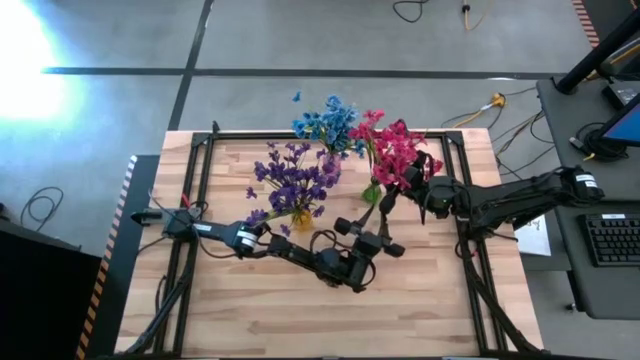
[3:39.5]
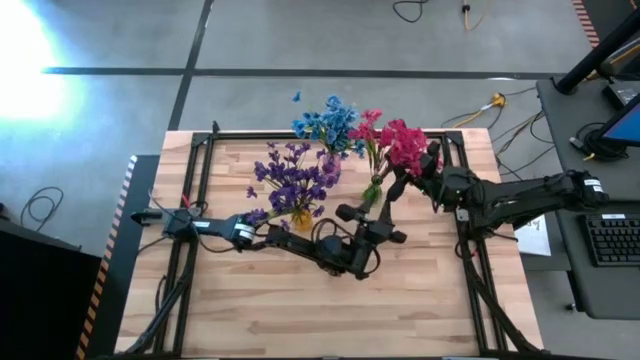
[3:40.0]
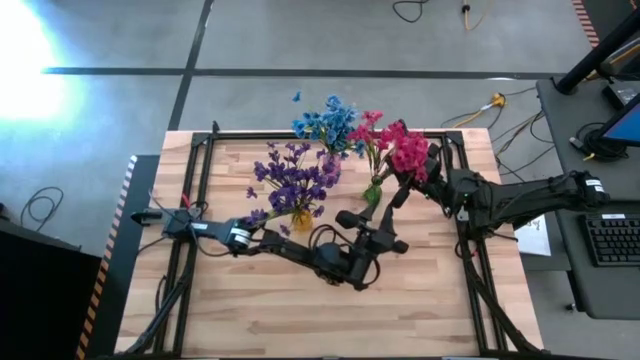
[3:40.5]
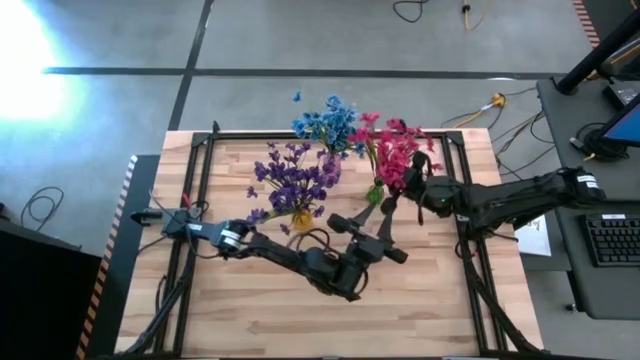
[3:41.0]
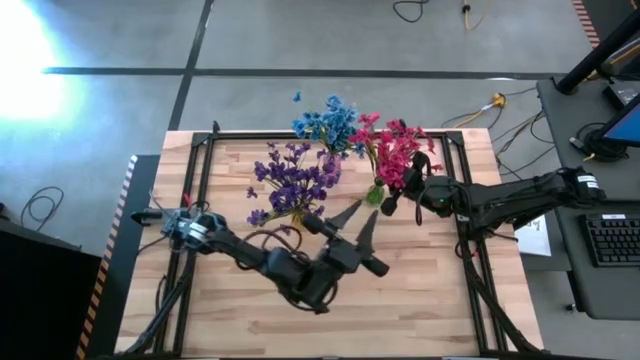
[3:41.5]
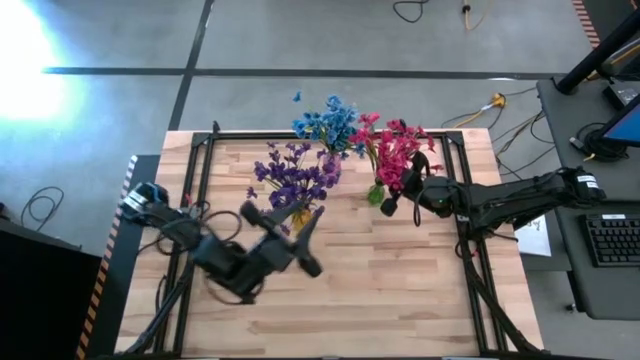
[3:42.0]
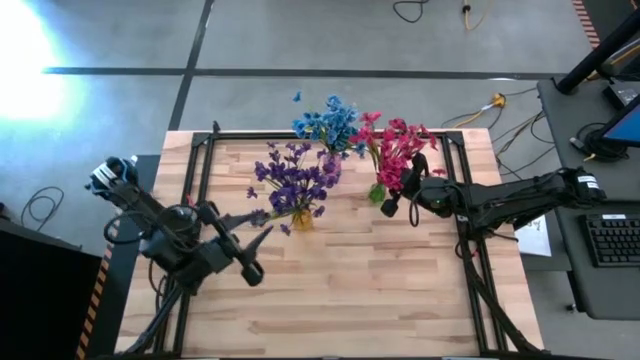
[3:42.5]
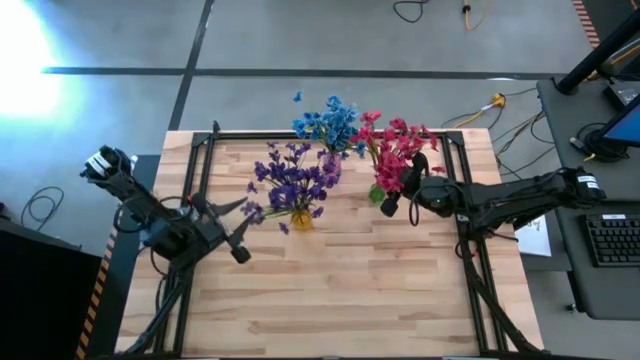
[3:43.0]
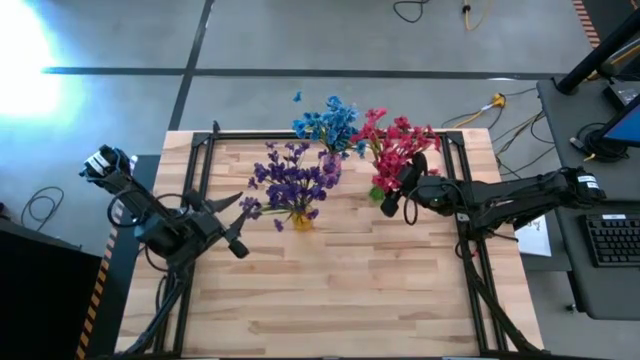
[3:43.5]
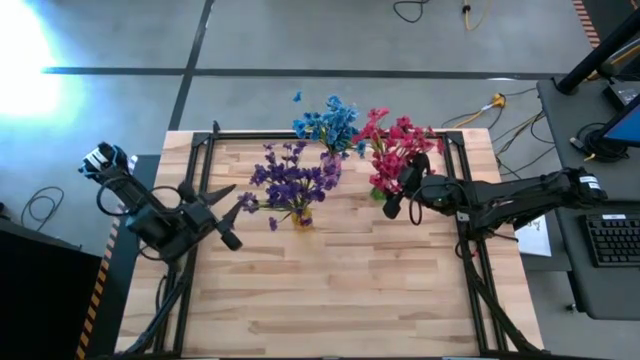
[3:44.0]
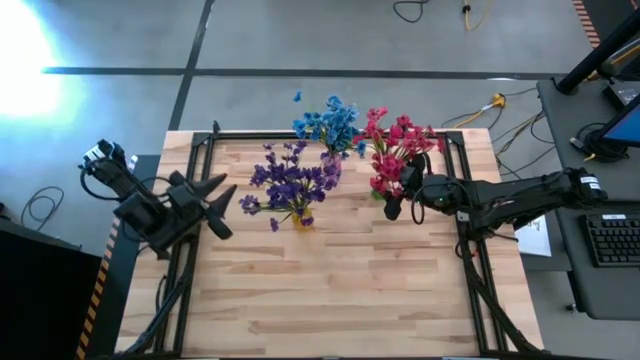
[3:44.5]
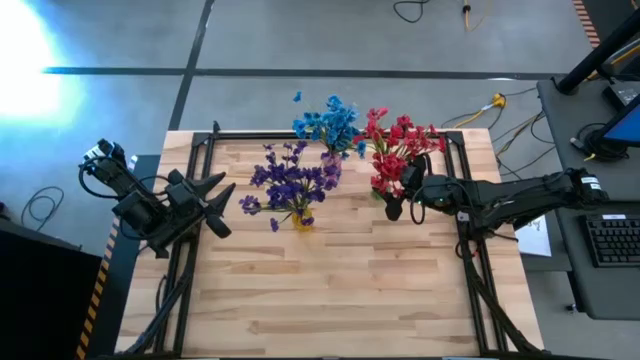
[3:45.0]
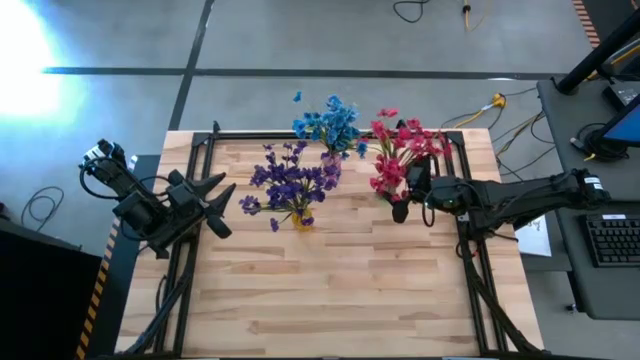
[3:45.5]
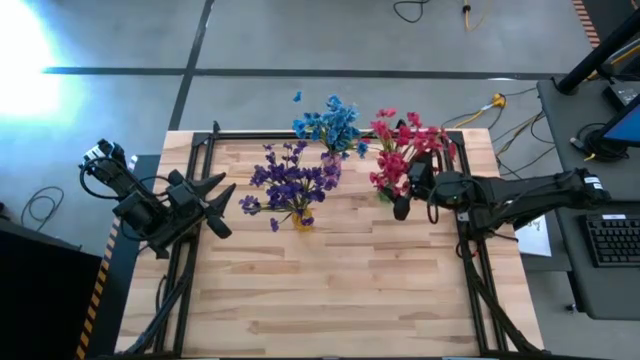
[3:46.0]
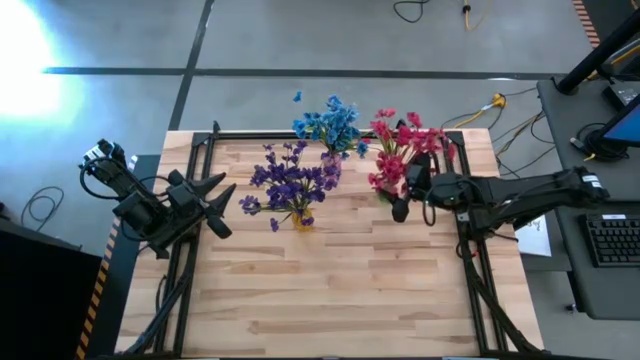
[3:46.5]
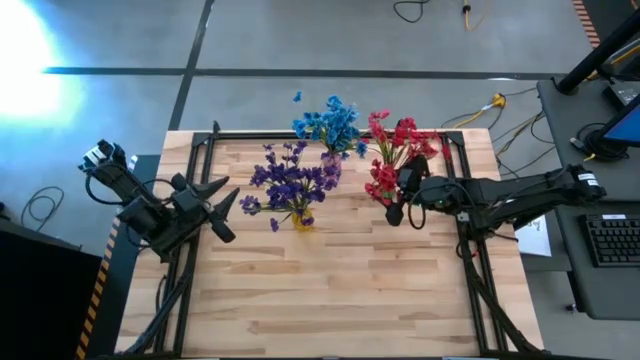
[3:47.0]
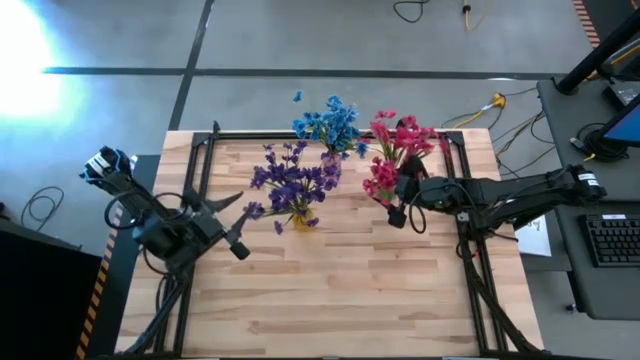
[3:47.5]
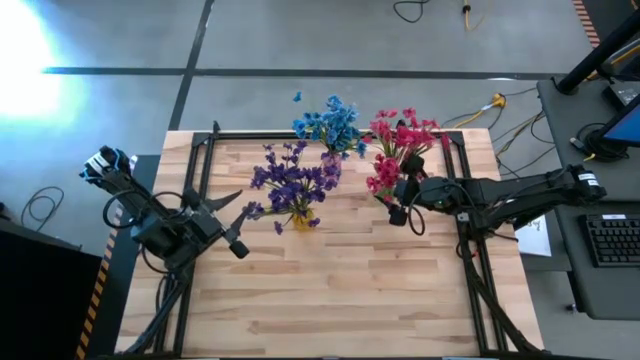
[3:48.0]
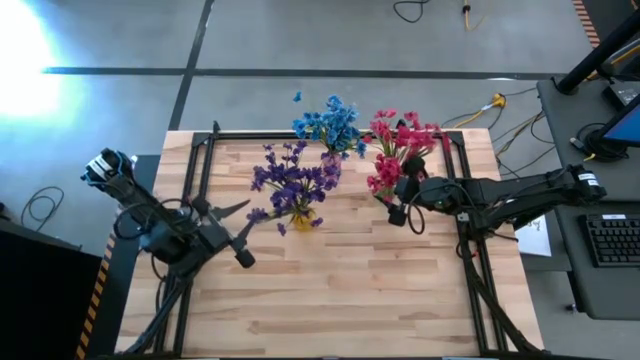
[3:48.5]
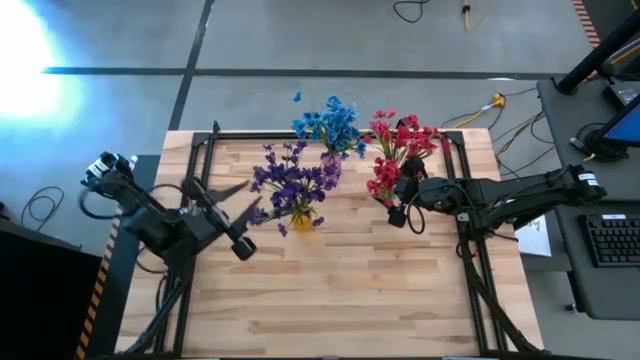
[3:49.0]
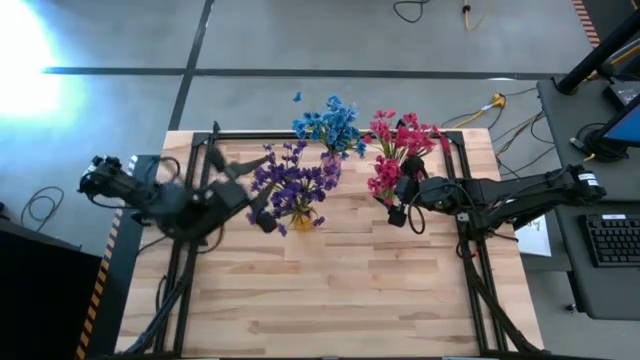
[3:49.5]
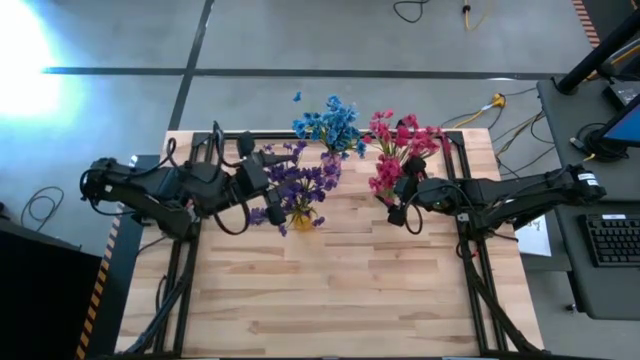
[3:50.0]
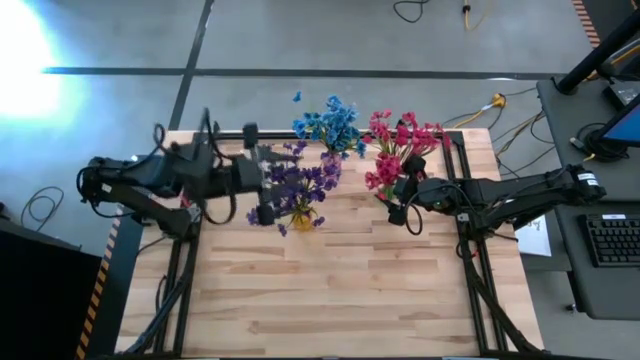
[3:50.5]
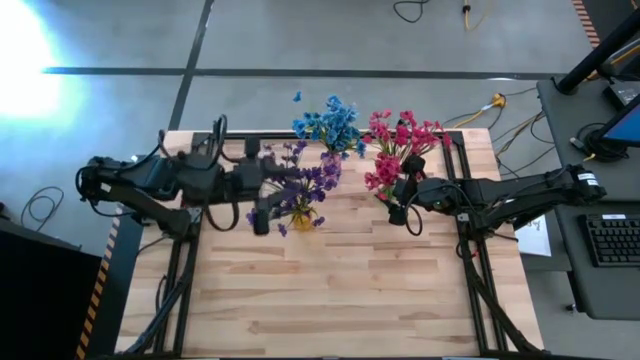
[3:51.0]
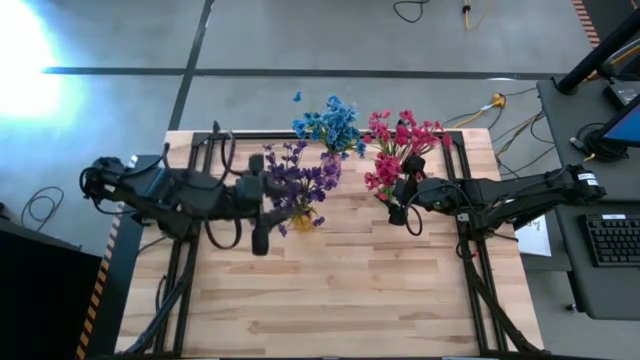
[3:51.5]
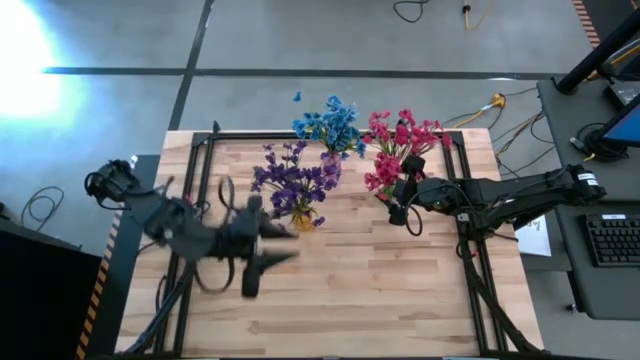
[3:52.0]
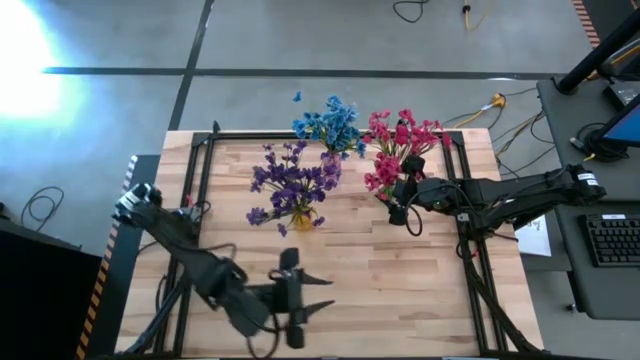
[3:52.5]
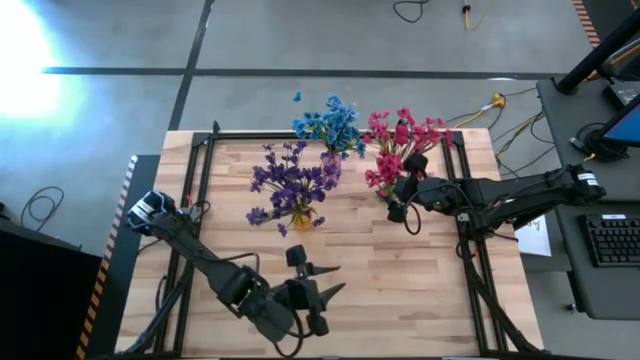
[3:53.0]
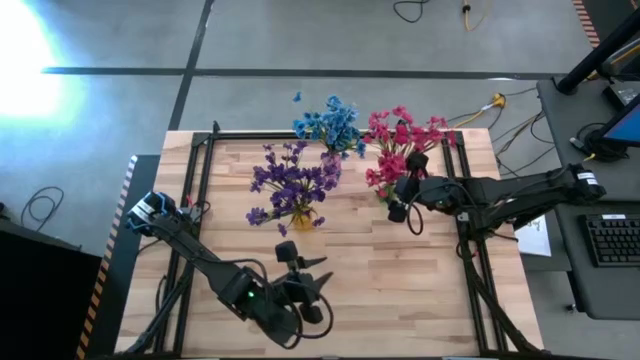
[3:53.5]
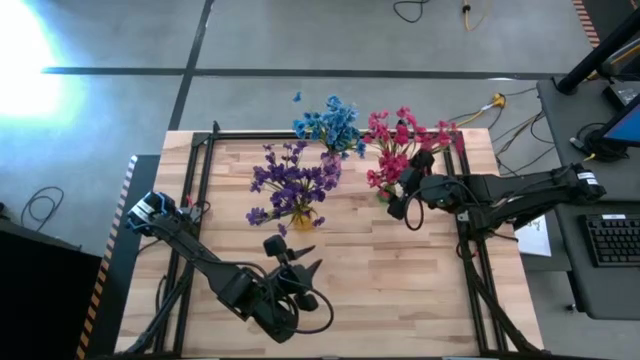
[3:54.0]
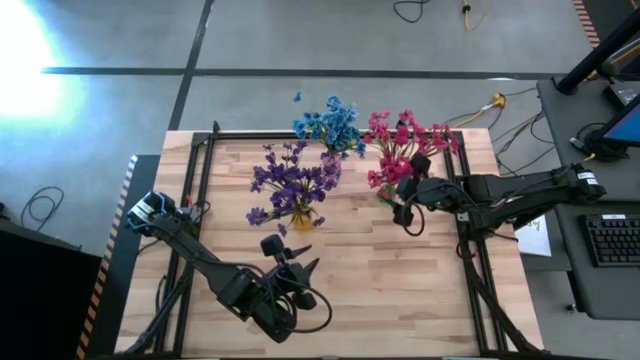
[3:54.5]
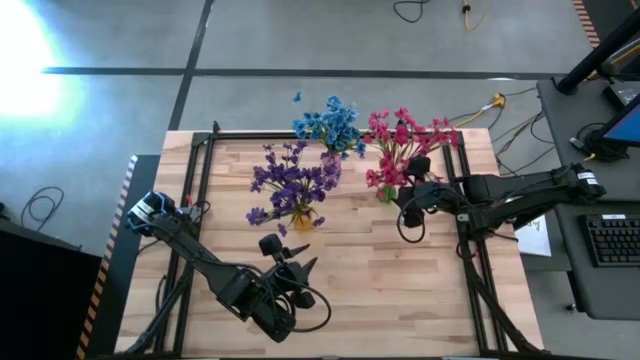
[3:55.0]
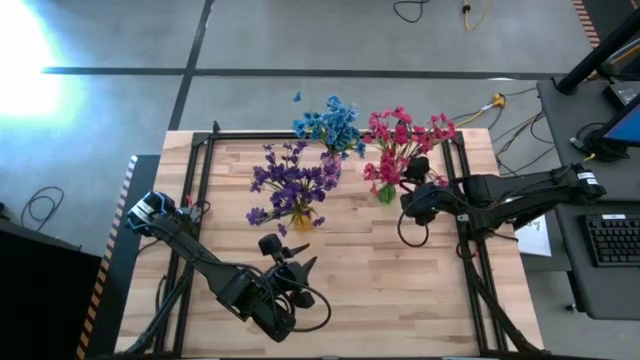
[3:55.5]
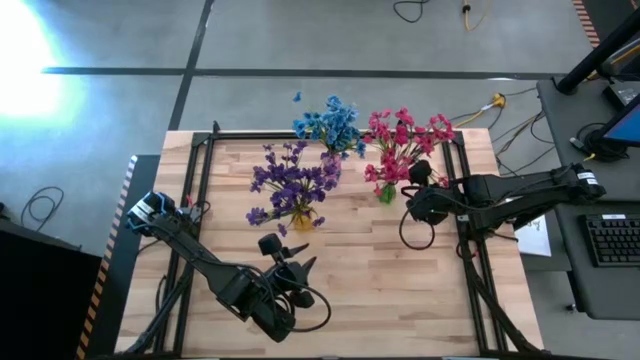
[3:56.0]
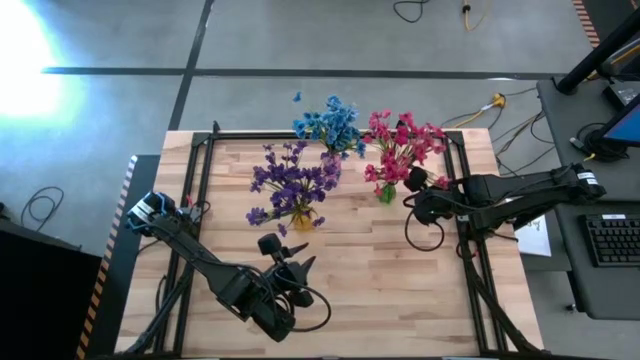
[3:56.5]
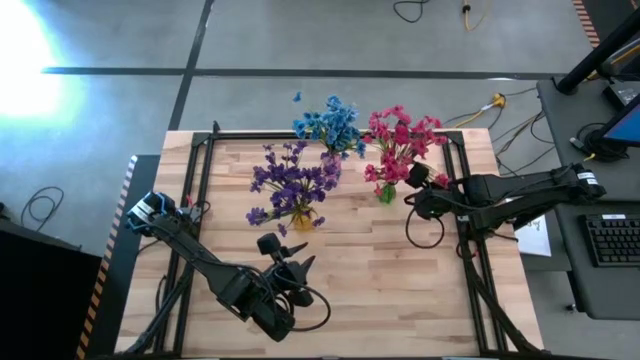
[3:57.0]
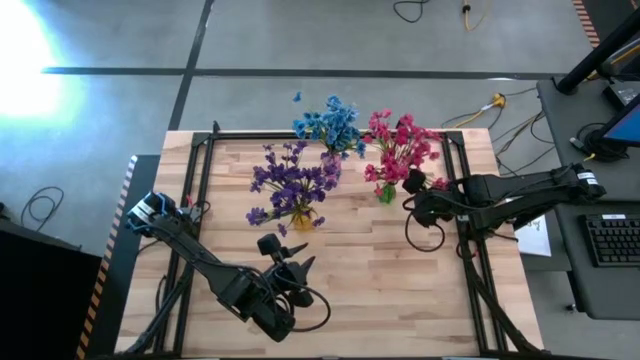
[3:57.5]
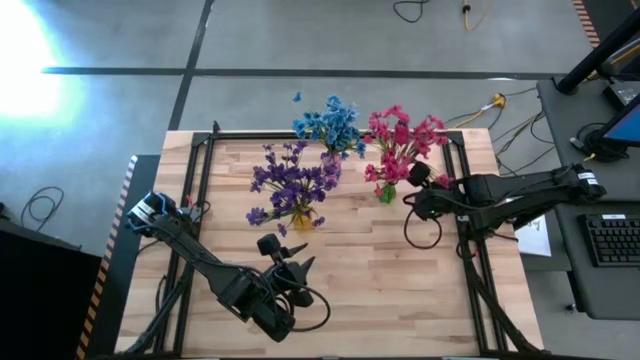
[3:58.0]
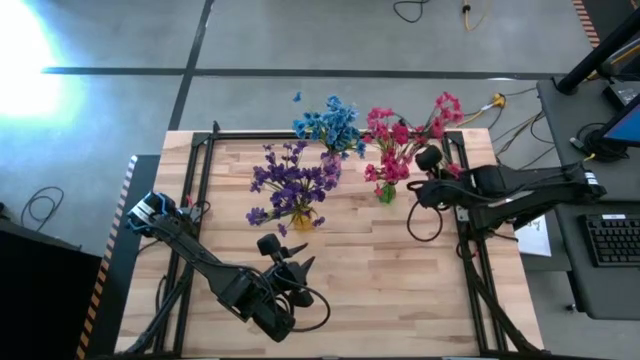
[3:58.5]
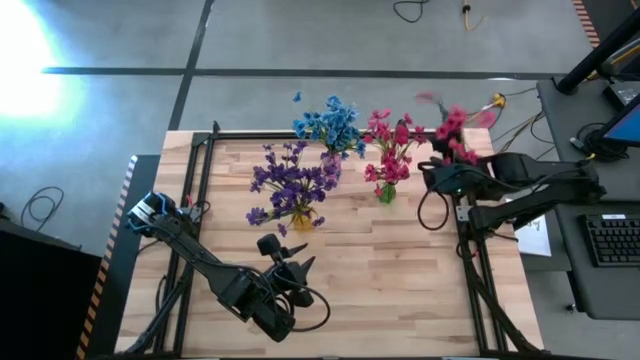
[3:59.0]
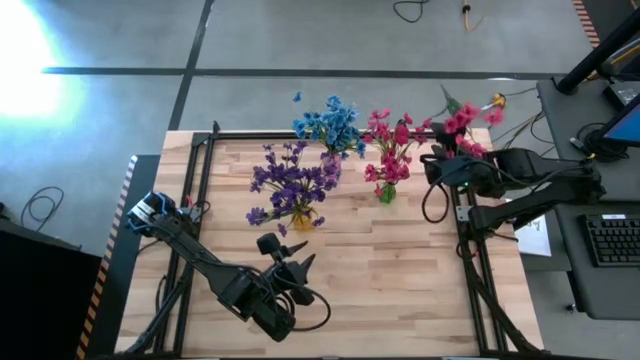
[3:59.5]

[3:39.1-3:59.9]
Task: Sort flowers into vase by color
Put the pink flowers into the green vase
